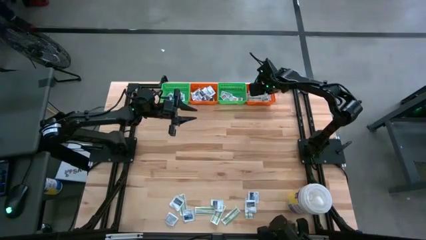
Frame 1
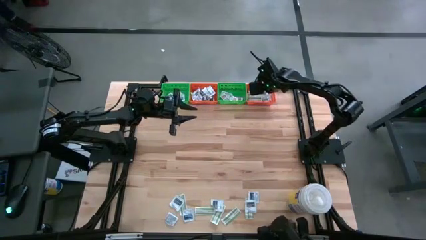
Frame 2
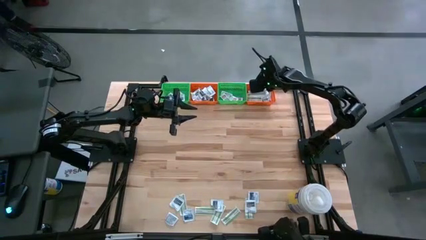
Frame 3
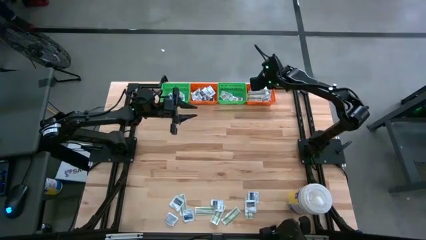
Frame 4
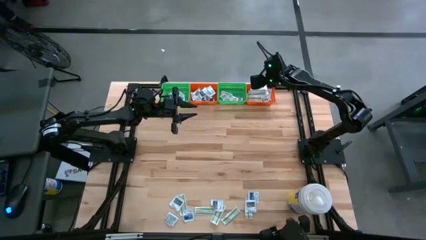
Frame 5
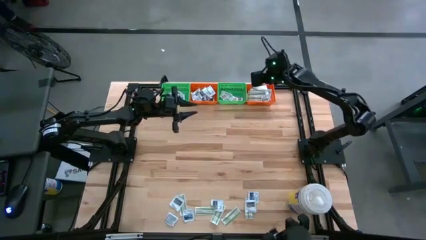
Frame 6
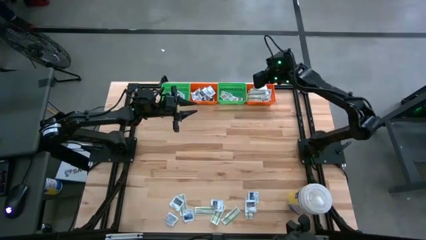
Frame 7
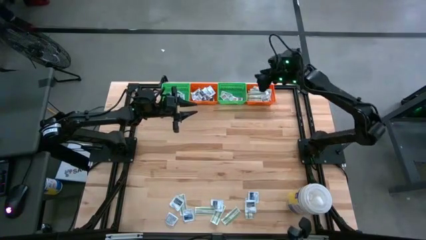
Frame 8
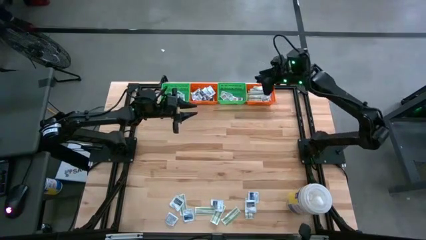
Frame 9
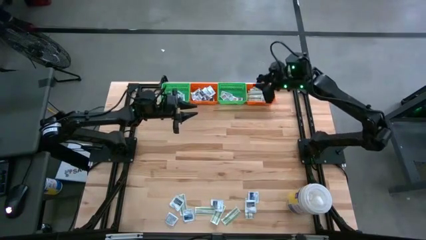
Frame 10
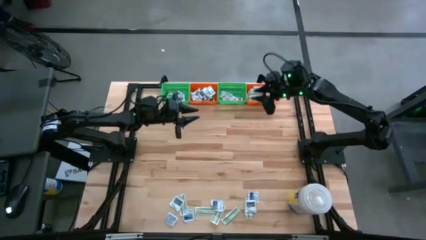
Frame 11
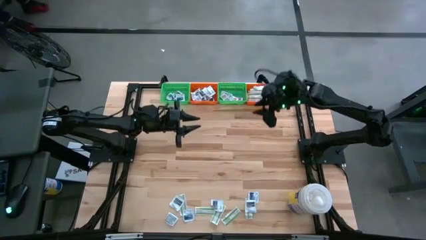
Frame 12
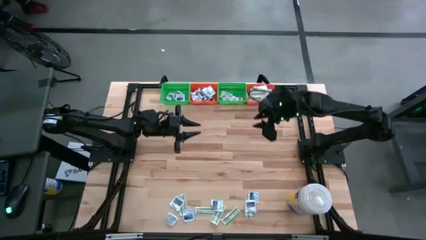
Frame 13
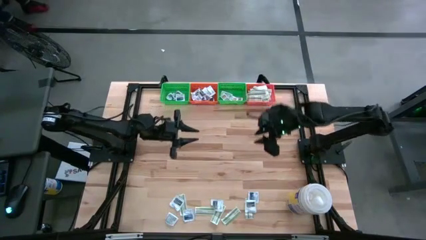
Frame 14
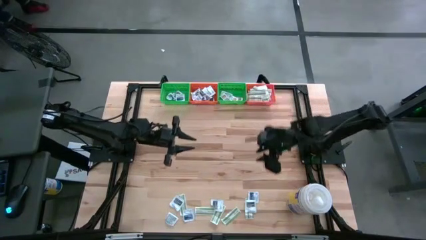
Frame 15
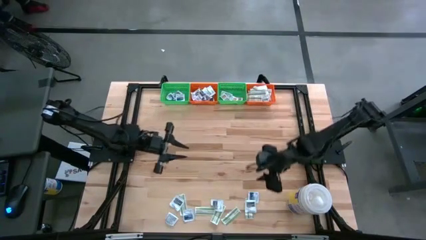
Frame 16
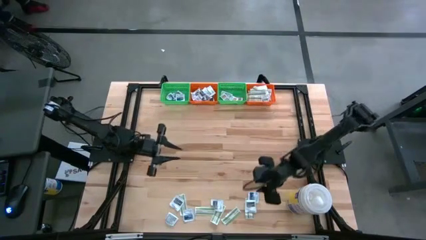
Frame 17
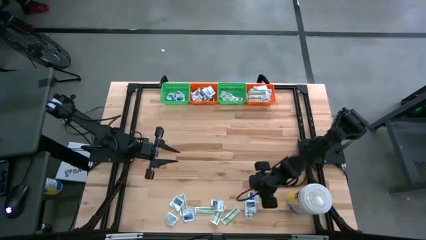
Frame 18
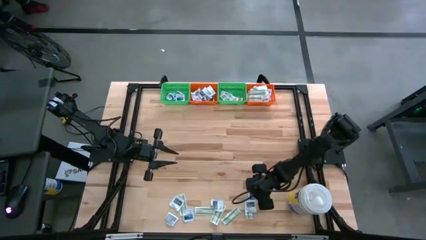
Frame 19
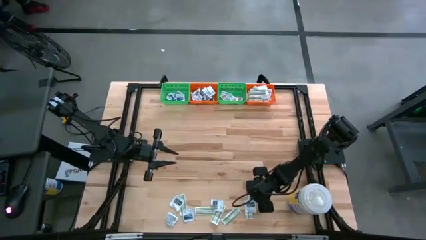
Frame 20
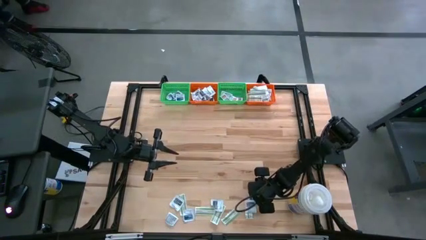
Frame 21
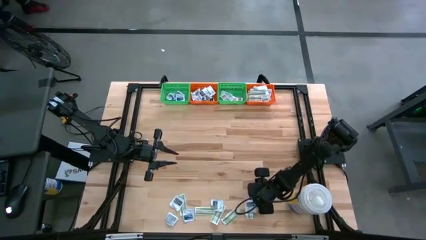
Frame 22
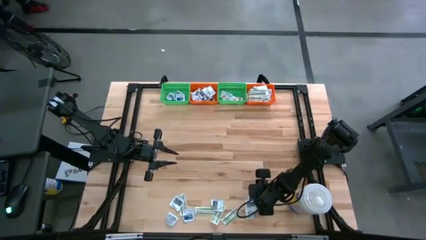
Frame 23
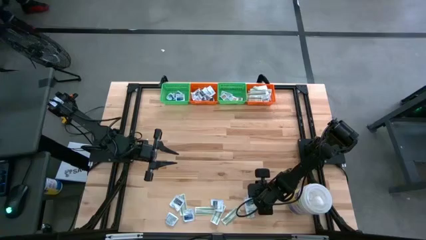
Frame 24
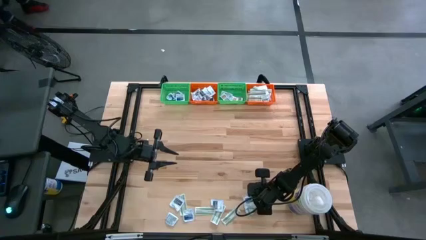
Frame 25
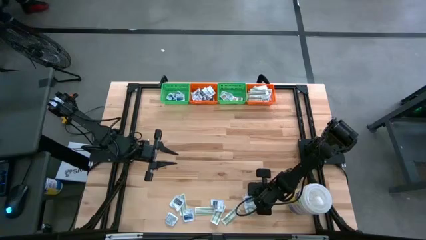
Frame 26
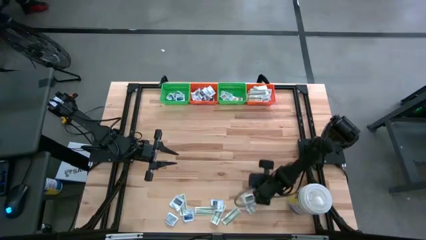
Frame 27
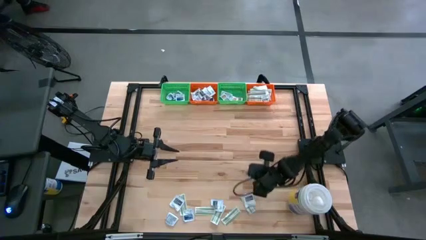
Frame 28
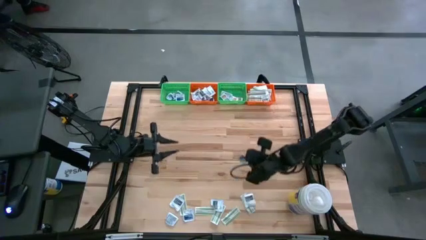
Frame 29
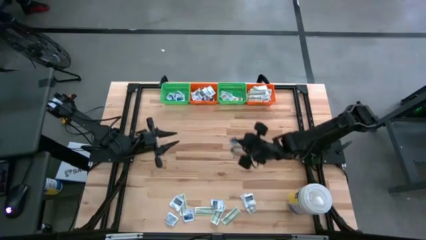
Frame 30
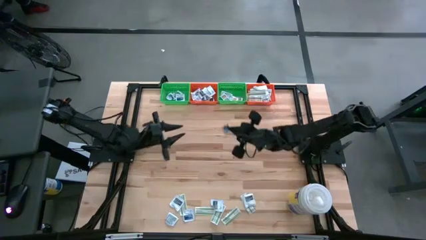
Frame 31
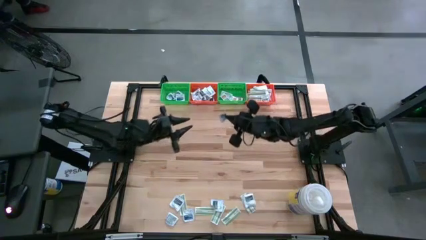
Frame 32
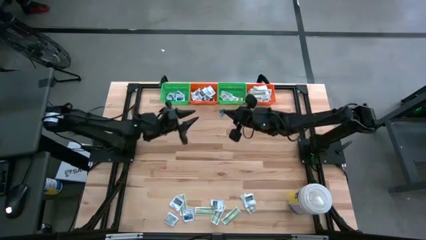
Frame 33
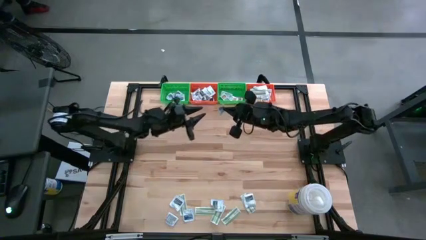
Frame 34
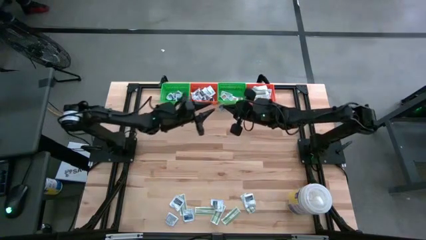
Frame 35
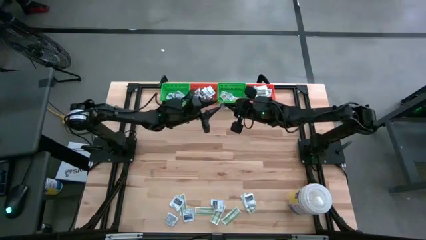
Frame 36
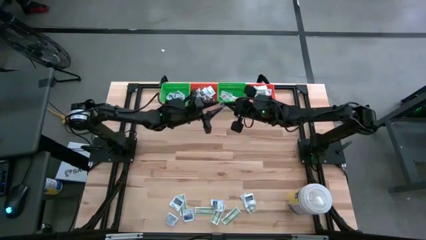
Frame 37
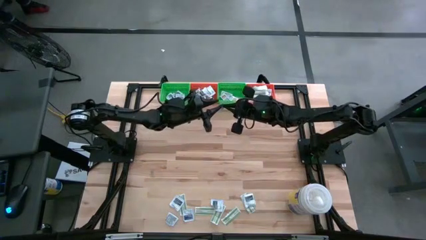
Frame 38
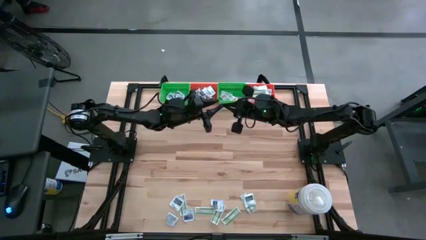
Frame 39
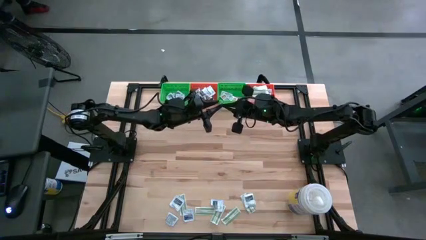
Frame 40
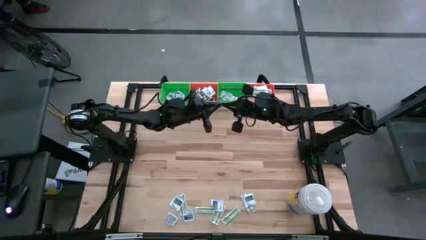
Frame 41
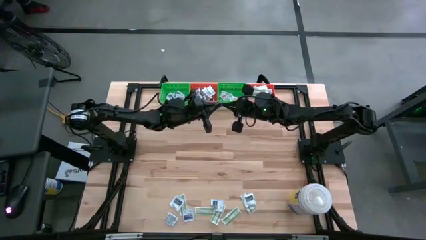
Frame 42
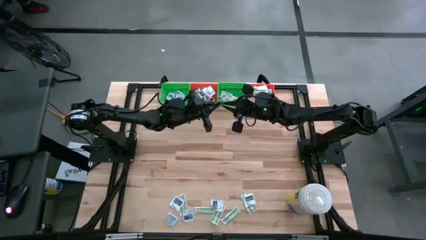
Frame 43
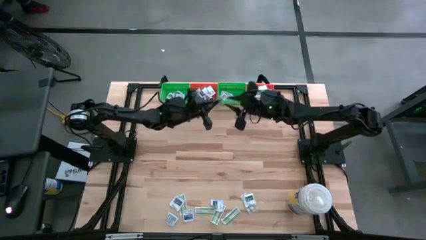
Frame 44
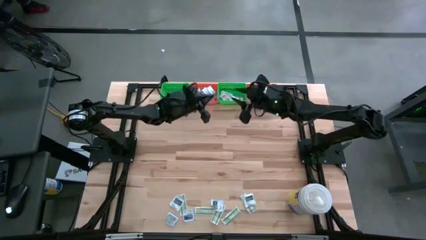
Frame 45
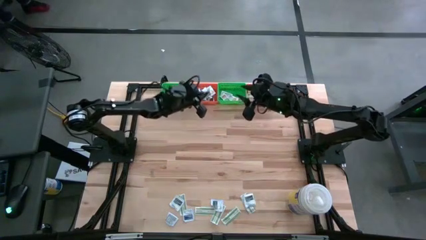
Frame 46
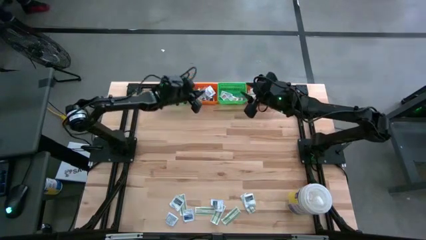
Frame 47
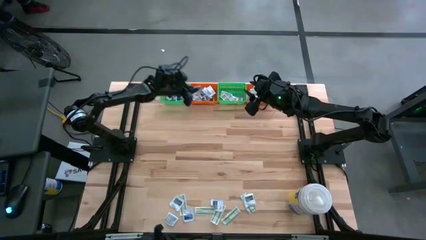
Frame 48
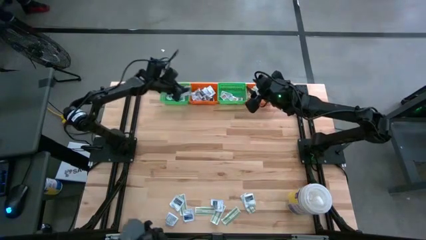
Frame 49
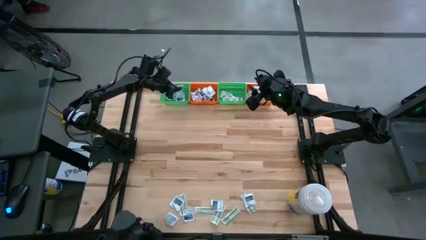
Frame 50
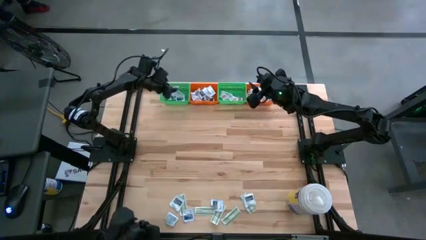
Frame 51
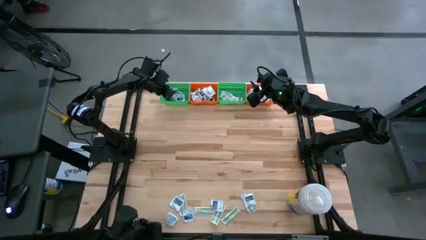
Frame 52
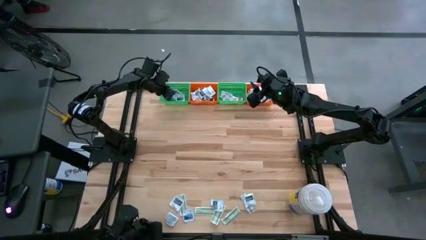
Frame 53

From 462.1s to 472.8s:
Task: Pick & Place First Aid Supplies
Put the blue alcohol pad in the left green bin

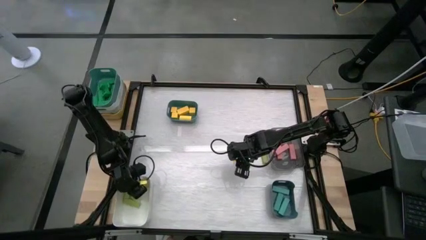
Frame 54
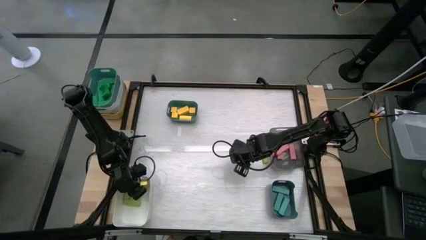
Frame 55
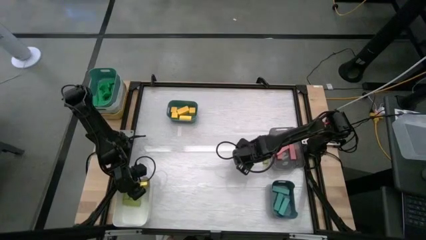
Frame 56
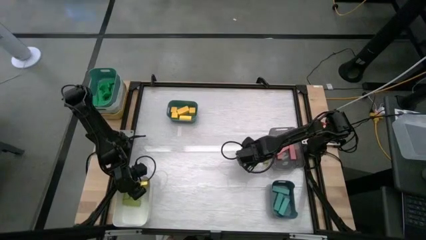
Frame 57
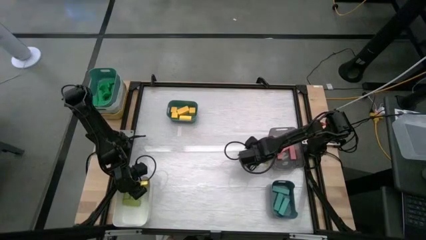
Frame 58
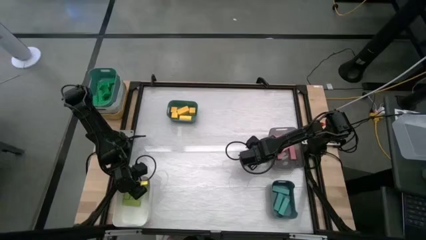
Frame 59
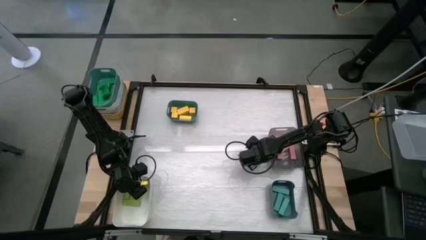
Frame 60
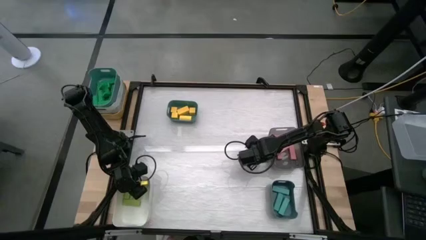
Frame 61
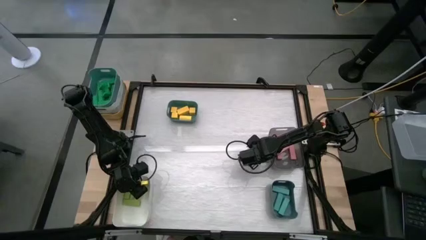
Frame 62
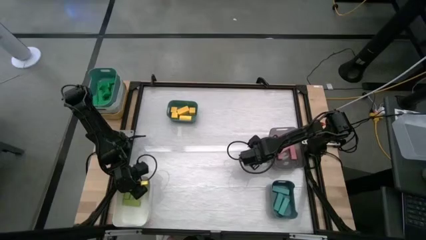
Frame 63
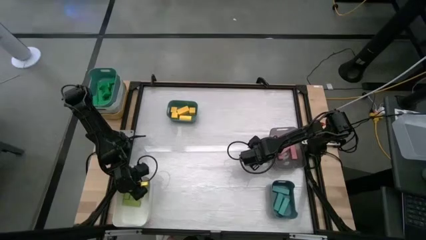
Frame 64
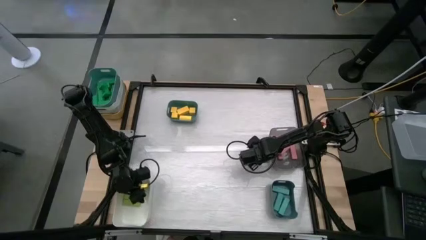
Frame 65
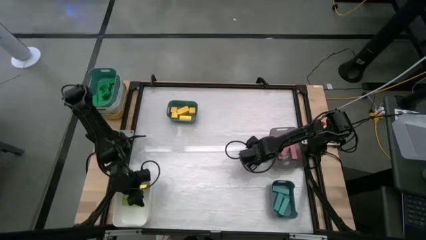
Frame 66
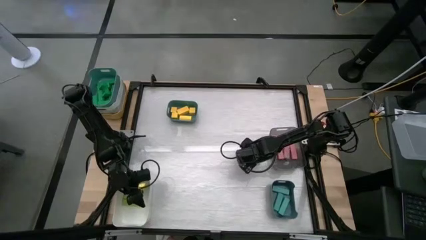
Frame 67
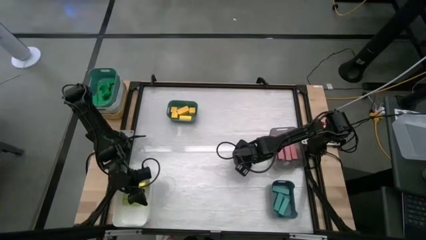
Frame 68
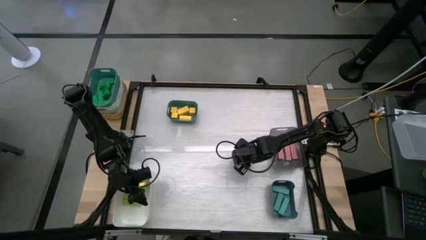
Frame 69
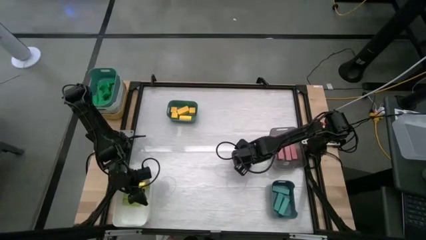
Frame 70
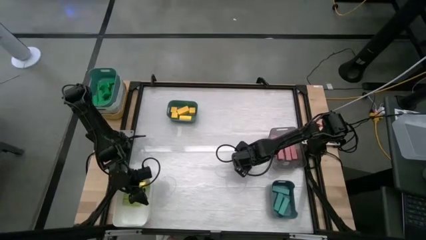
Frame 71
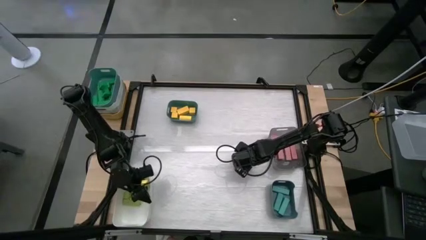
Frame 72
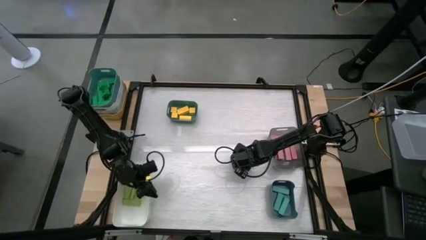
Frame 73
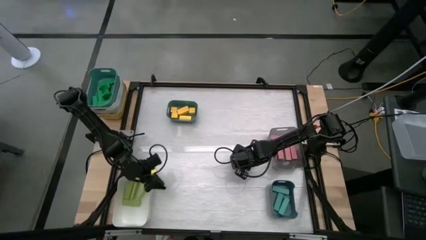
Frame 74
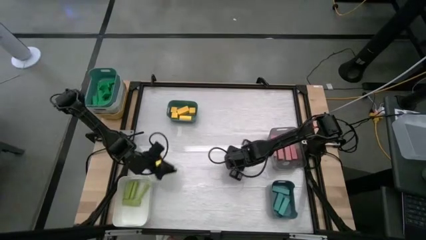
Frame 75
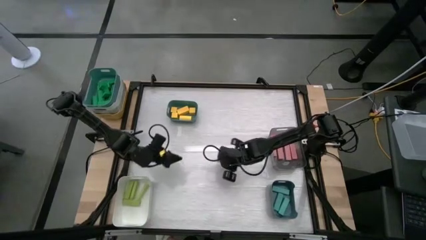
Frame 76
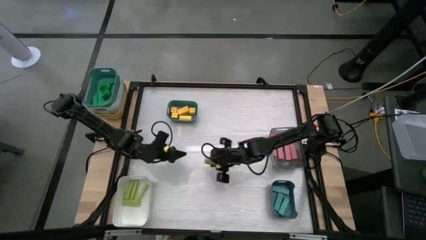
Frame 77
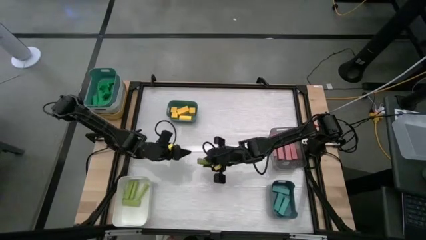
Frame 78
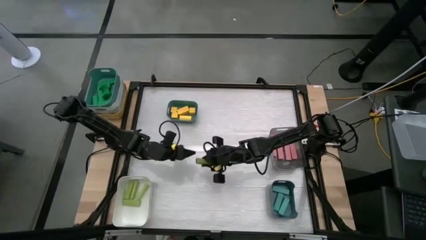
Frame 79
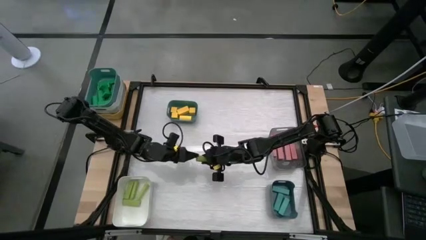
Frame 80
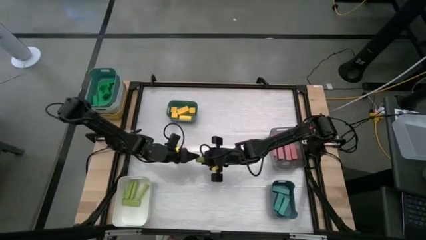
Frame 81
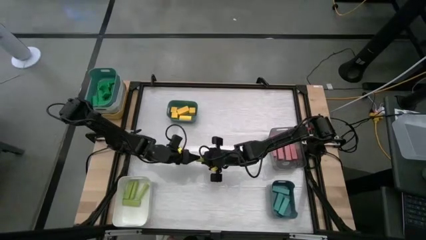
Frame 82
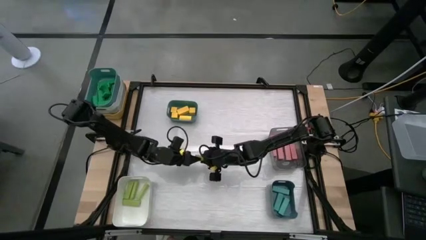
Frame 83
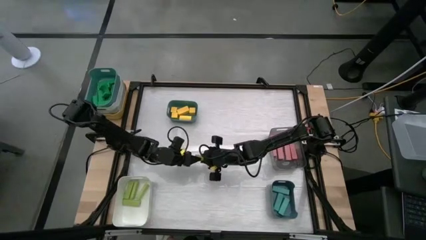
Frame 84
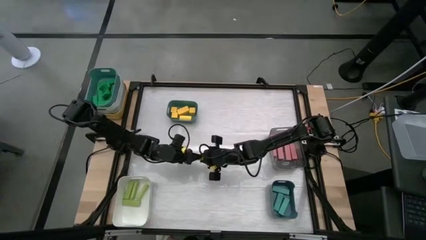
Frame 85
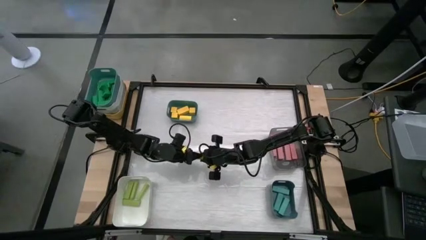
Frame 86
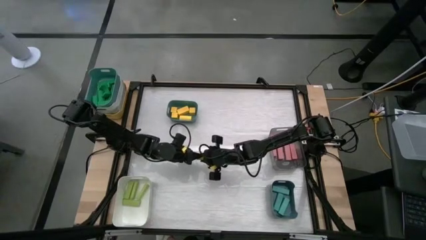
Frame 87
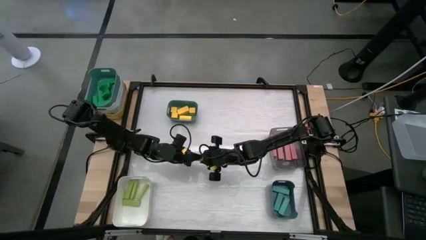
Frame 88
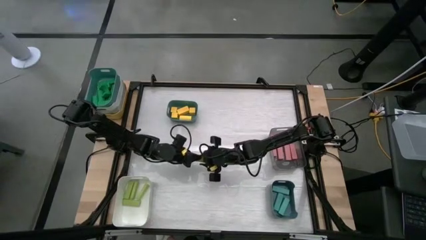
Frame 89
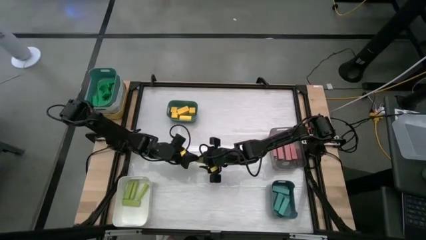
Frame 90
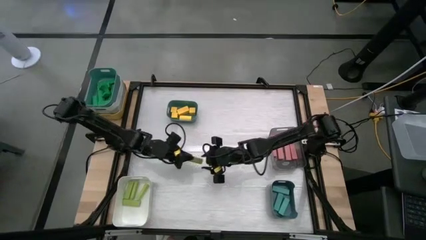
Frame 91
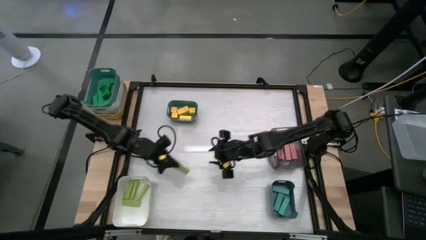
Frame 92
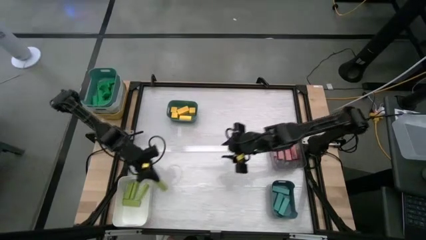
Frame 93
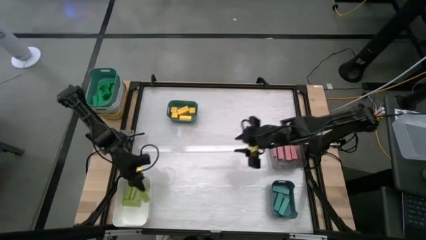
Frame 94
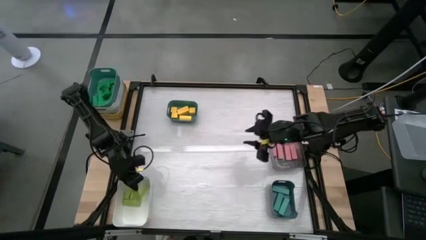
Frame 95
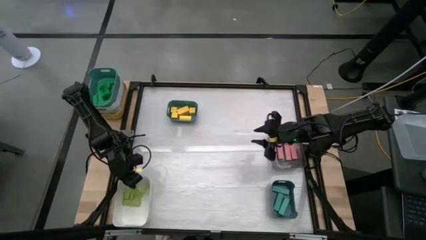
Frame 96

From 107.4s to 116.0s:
Task: Sort blocks
Put the green block into the white bin
